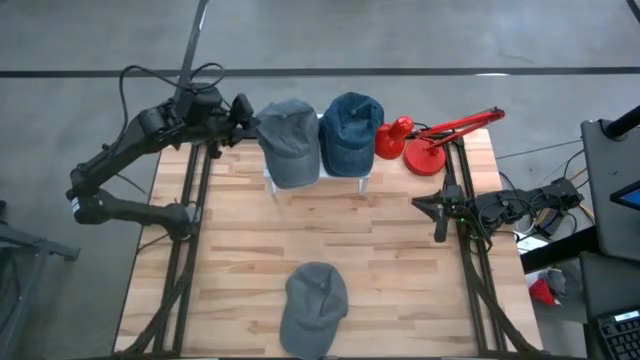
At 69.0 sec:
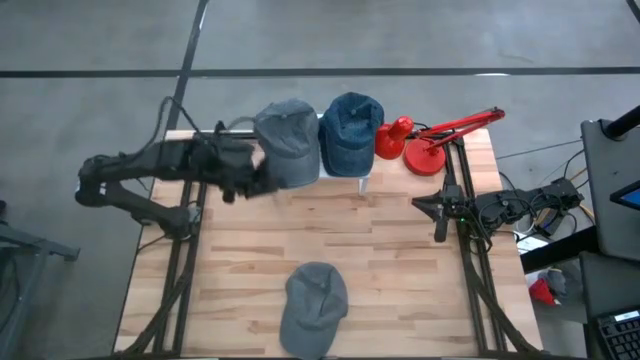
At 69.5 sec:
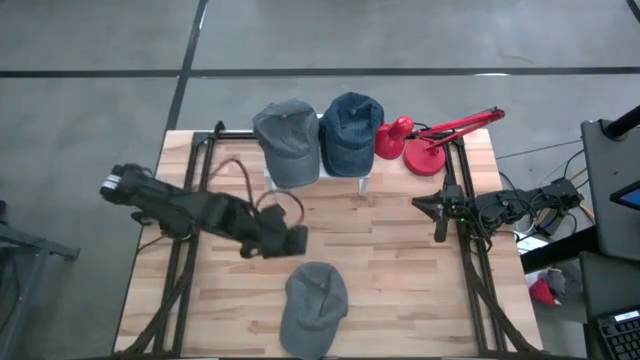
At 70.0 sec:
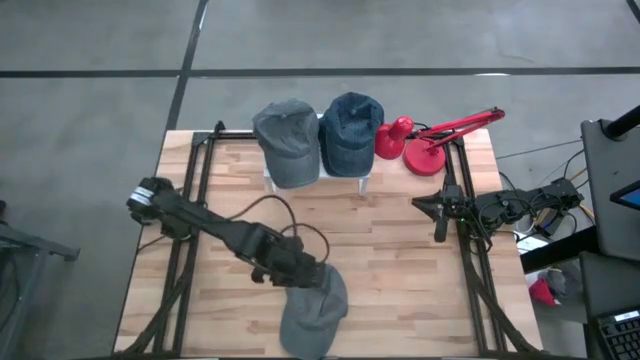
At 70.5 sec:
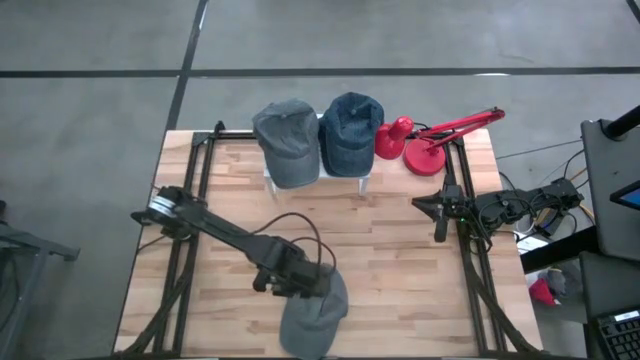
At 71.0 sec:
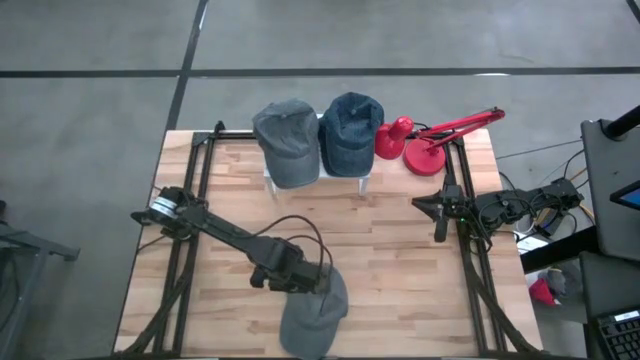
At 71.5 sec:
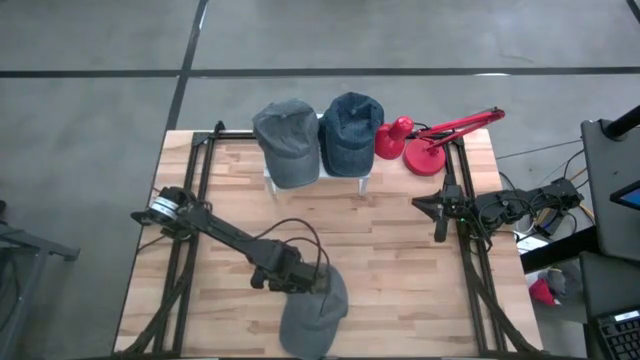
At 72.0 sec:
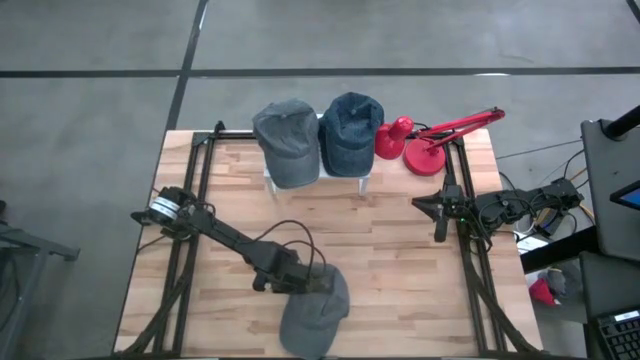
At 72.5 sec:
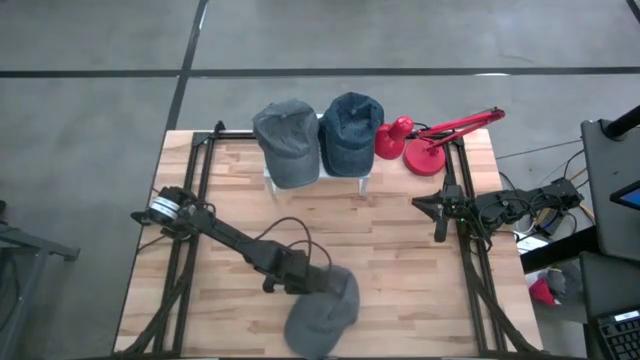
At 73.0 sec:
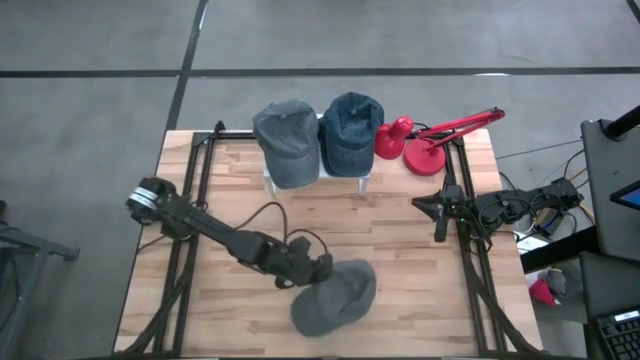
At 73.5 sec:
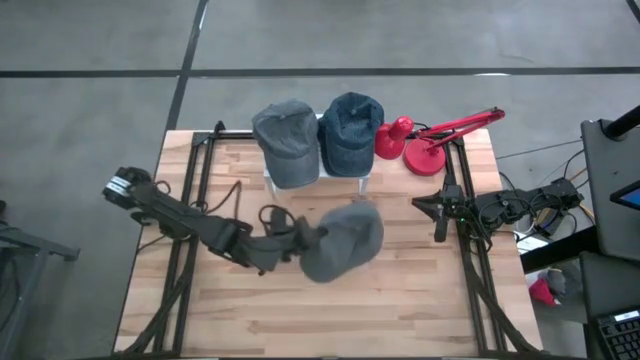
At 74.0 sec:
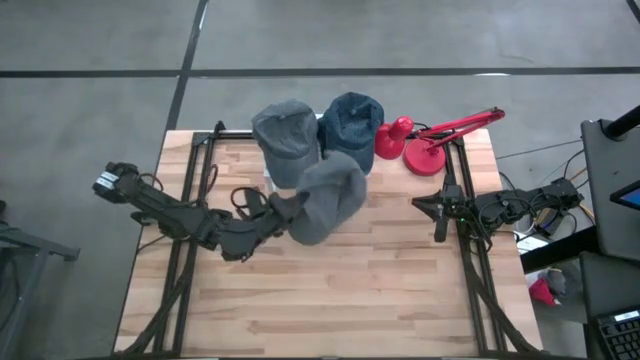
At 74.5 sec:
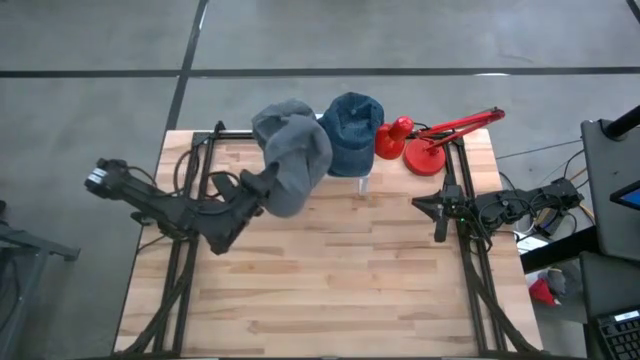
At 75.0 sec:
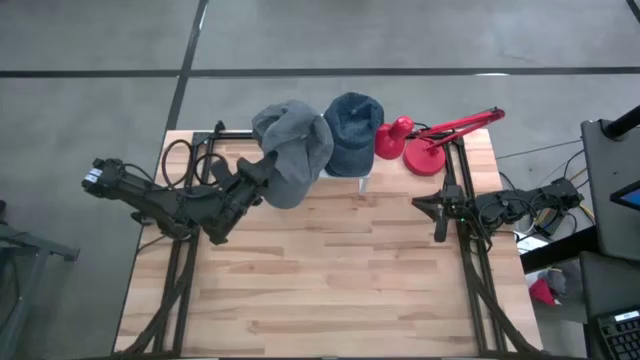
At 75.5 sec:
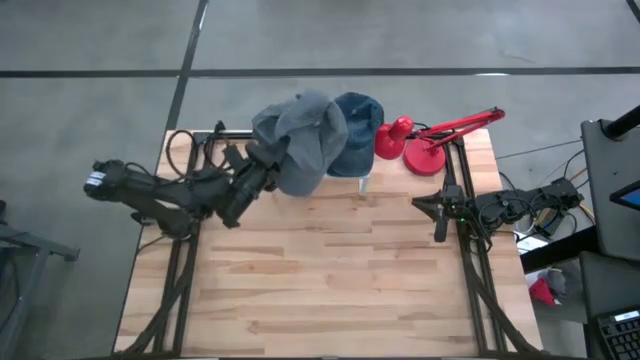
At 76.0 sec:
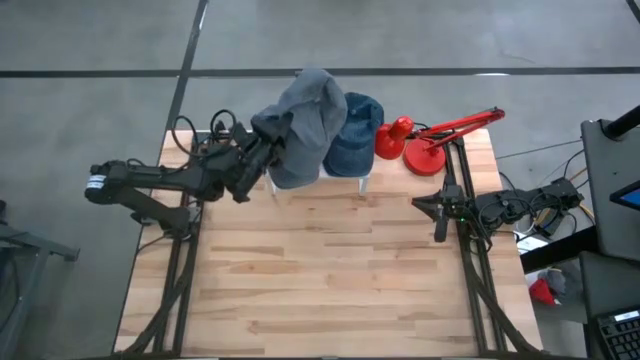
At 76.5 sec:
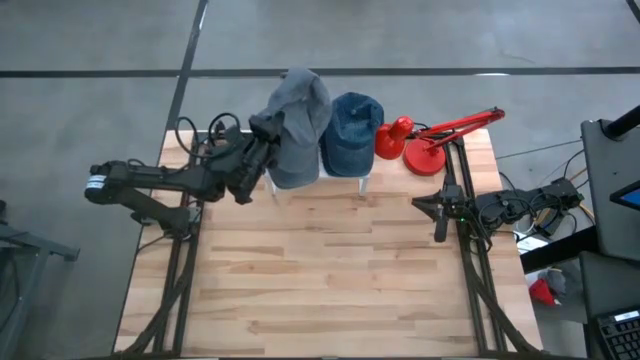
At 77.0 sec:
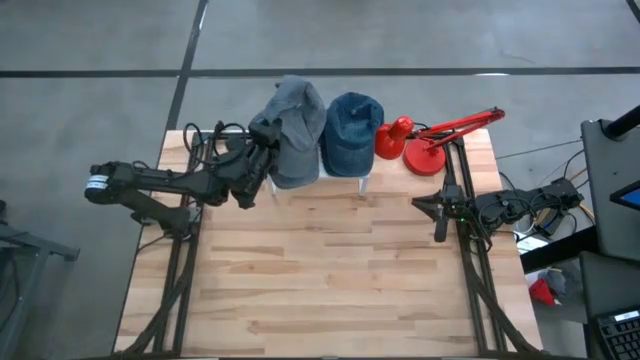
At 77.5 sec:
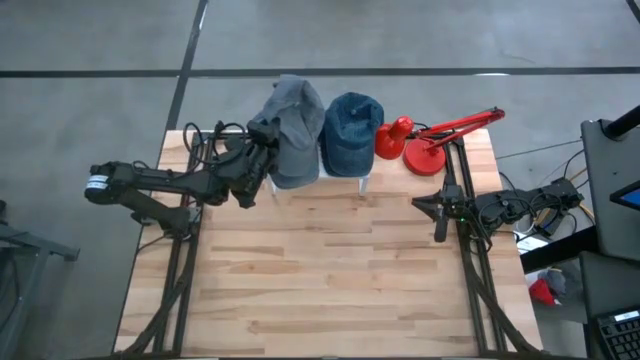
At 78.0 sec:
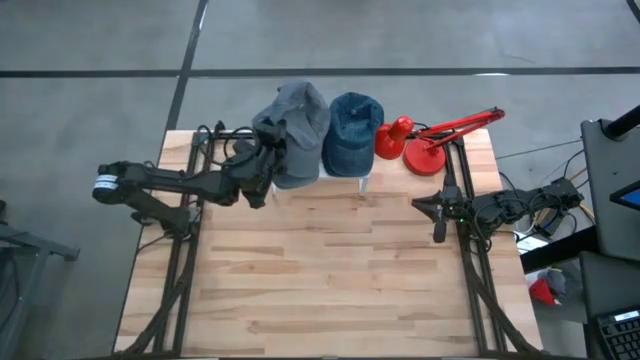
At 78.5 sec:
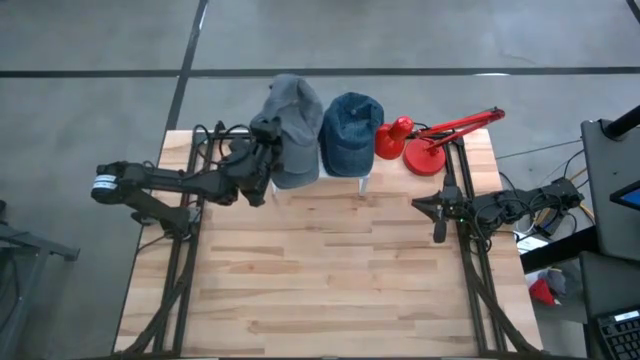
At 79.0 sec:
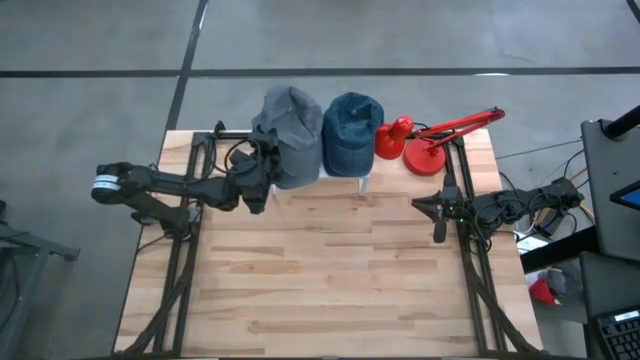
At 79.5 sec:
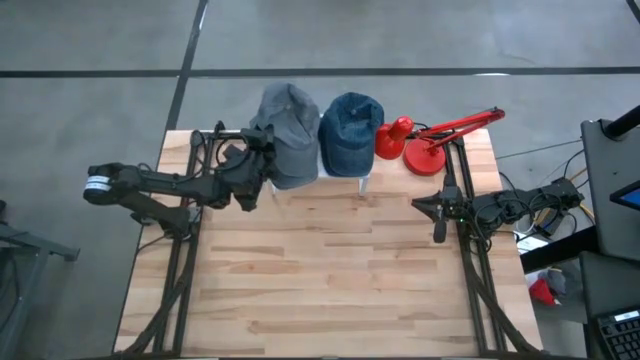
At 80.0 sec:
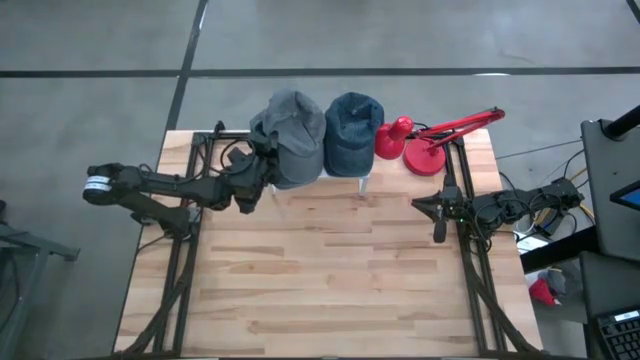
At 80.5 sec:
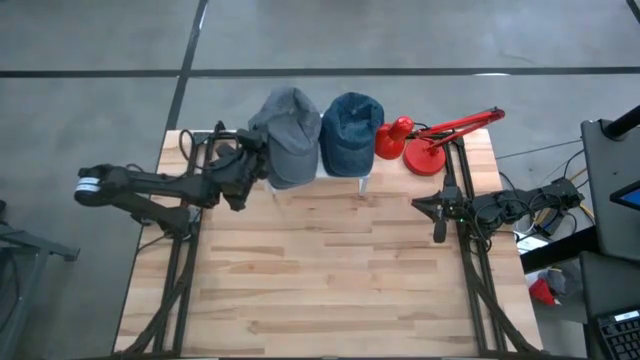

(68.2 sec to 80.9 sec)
Task: Pick & Place hat
Stack the gray cap on the gray cap on the shelf

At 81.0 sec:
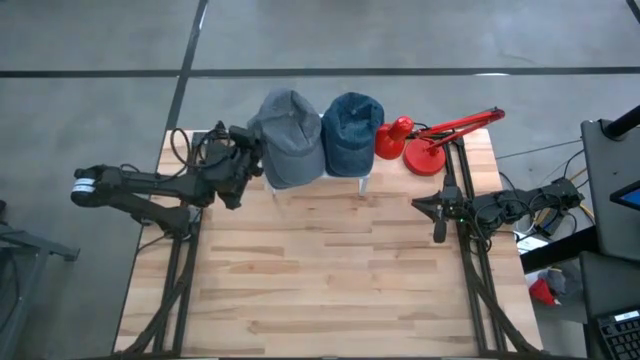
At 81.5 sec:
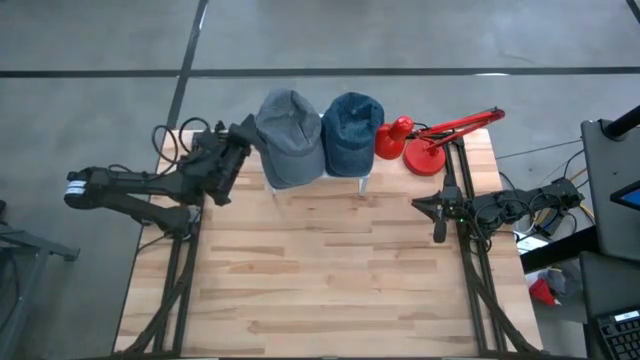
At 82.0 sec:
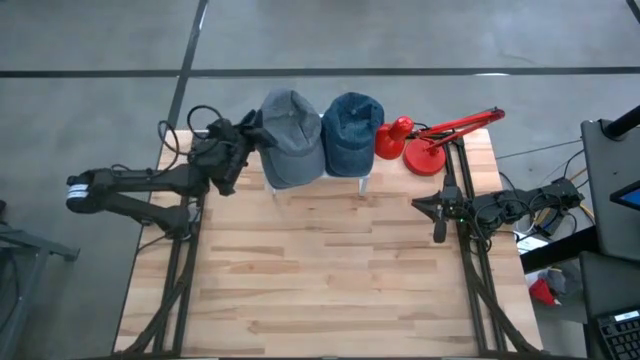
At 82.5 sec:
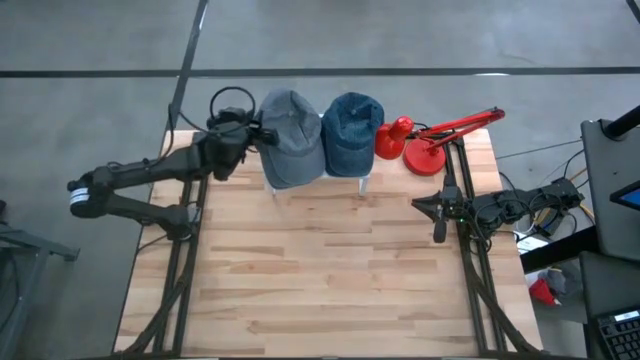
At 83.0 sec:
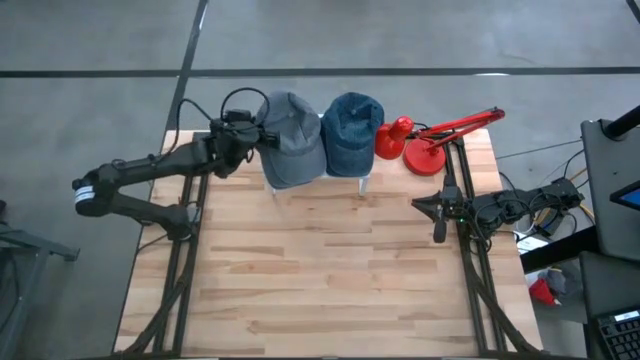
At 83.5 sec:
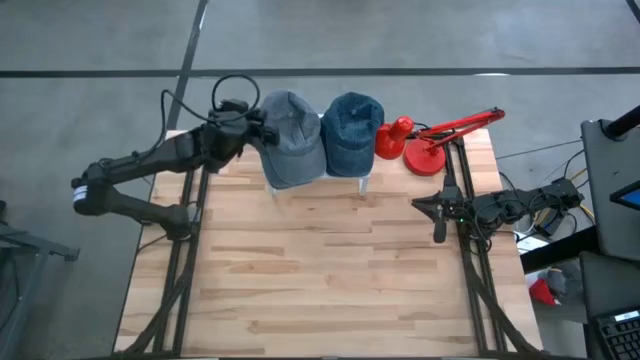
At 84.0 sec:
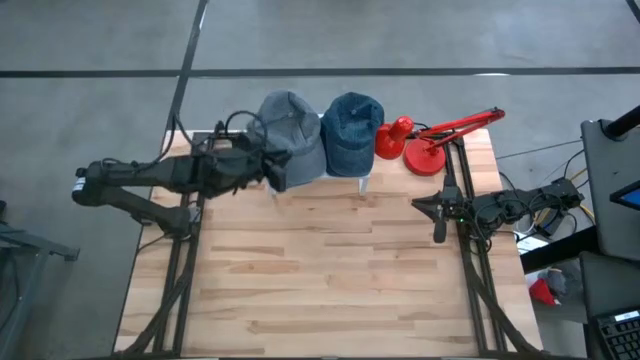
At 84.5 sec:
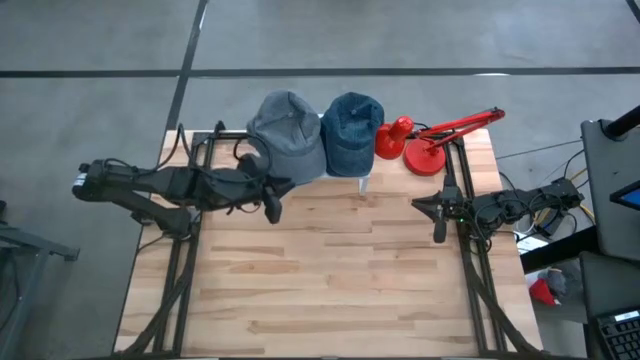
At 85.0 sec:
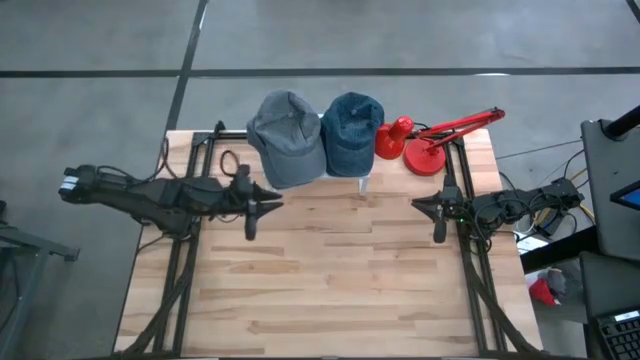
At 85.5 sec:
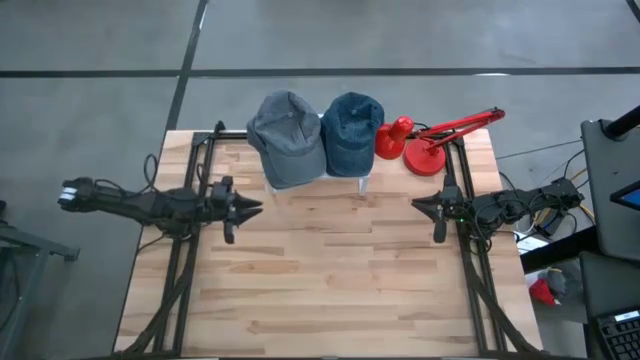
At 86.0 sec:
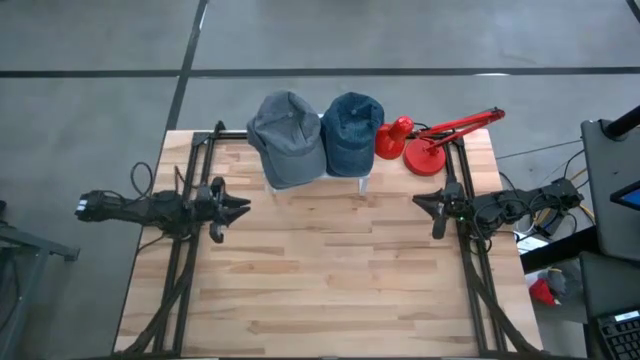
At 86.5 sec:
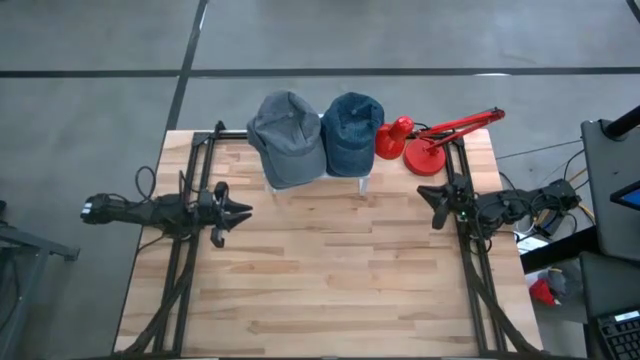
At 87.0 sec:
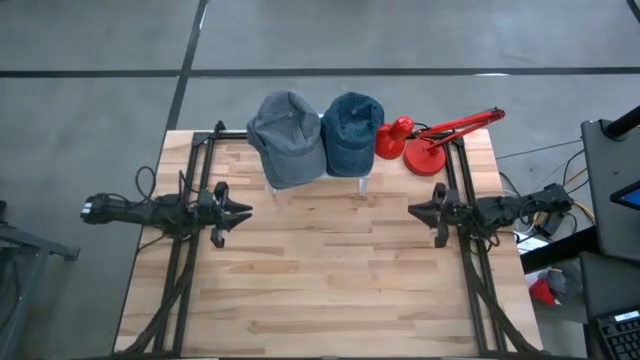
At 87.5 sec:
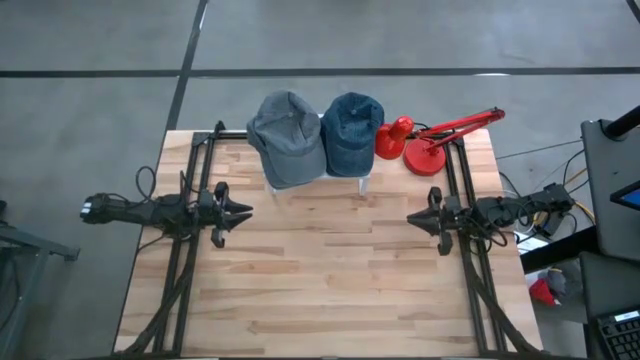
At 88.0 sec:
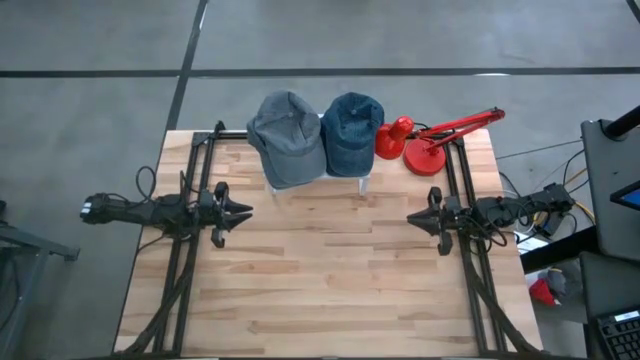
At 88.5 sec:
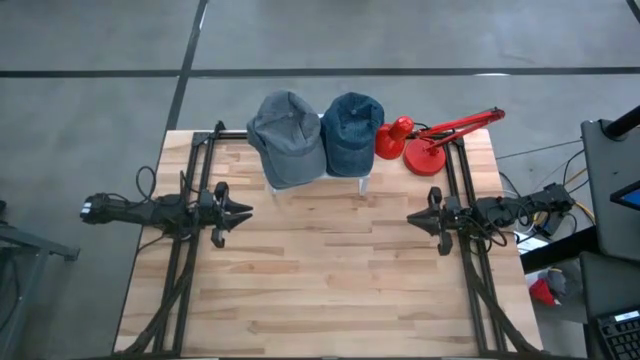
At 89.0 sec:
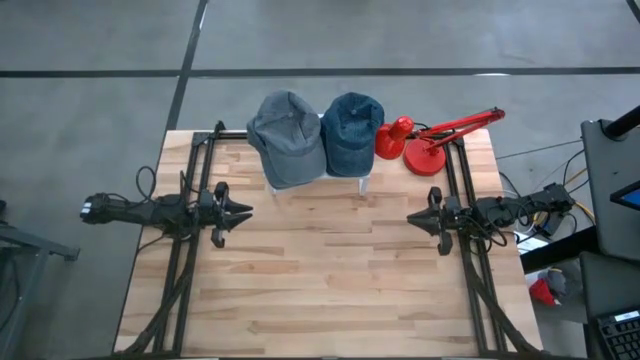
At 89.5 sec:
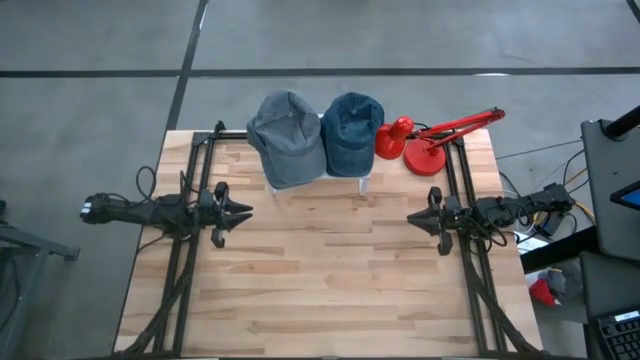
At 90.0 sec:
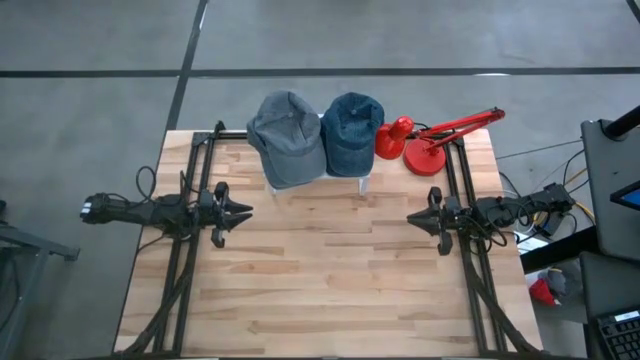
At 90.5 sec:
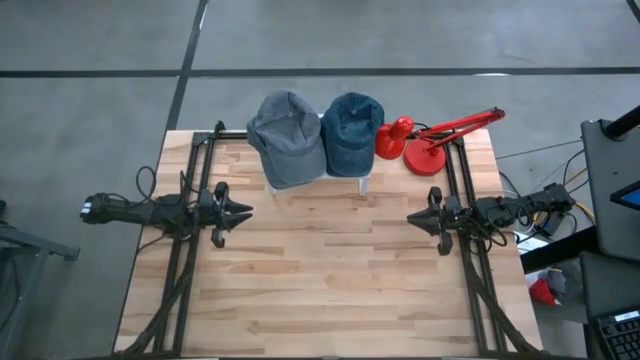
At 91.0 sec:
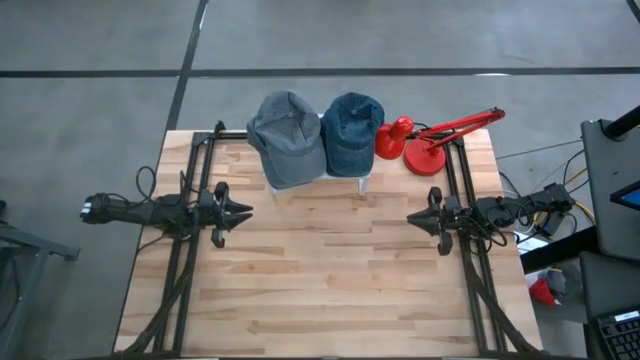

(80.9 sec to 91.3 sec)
Return to Home Position
